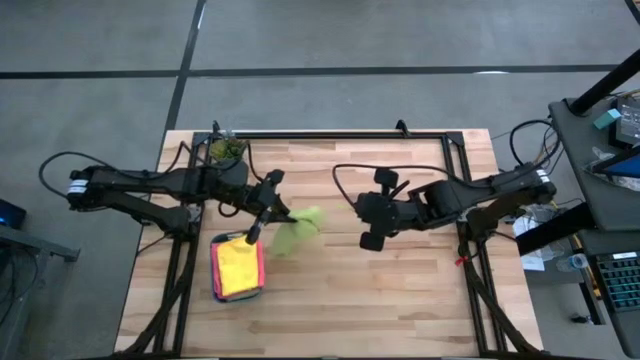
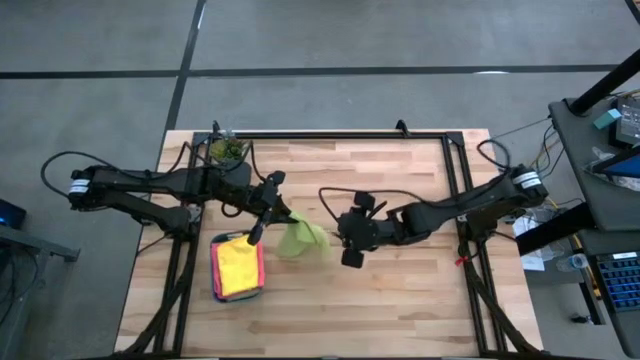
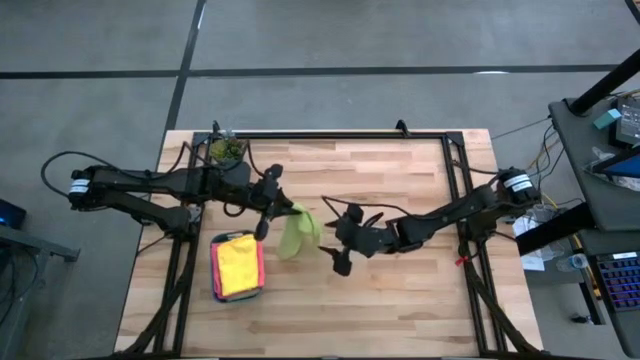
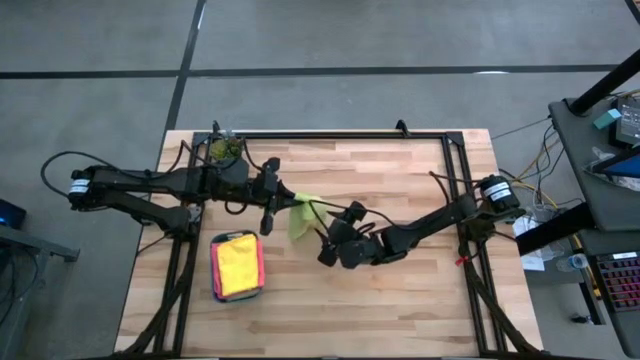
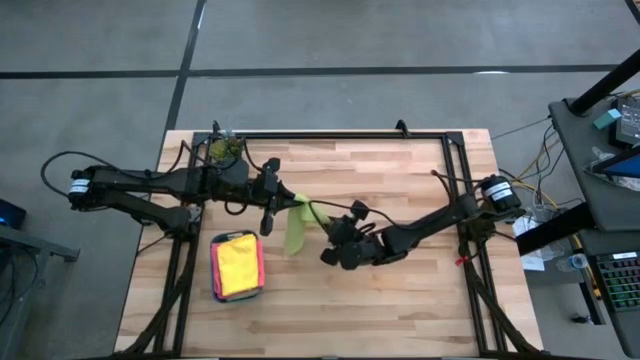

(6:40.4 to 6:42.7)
Task: Fold microfiber towels
Fold the green microfiber cloth

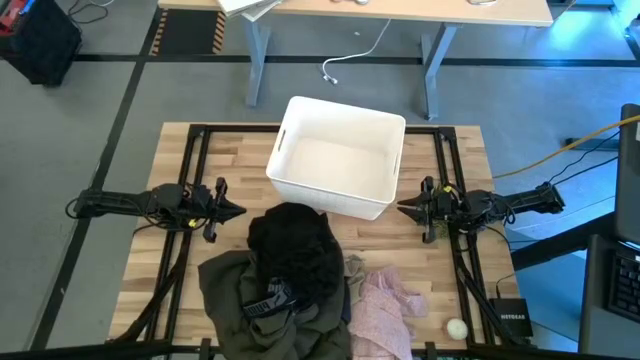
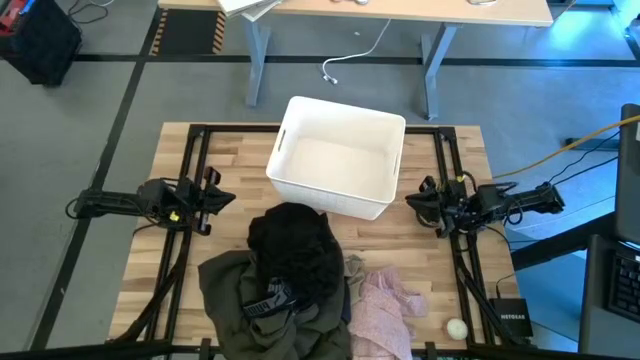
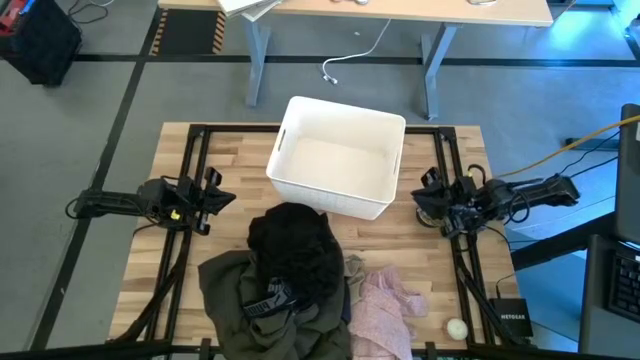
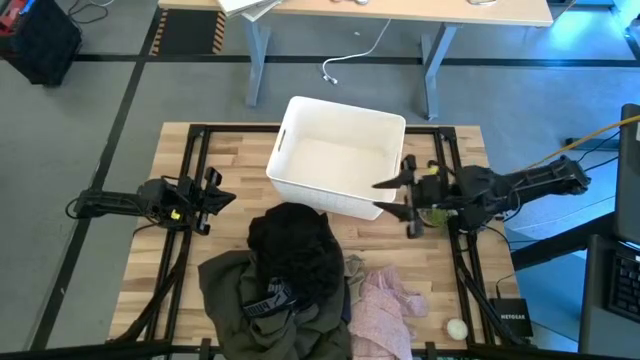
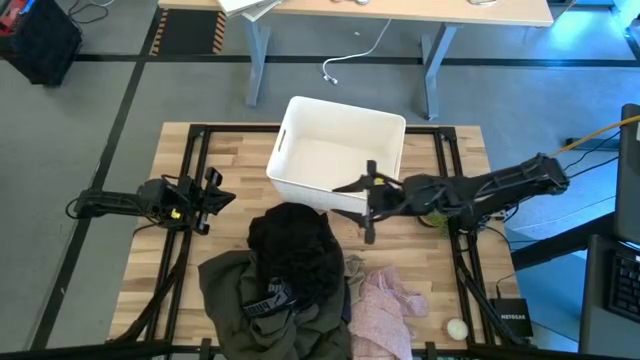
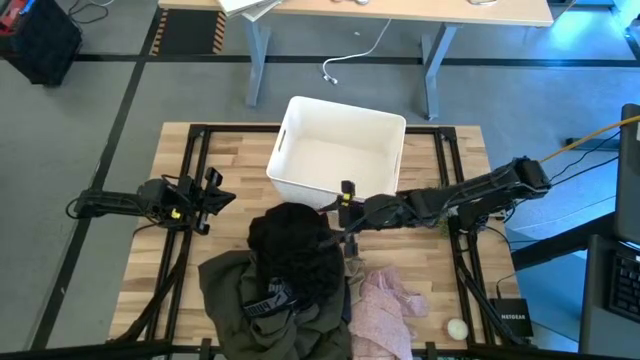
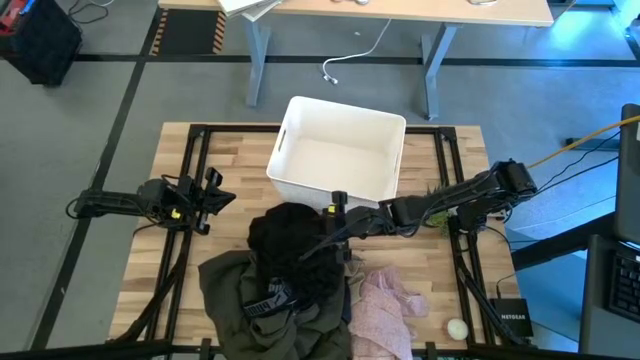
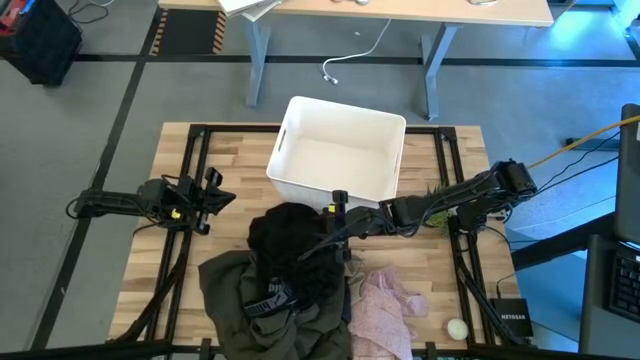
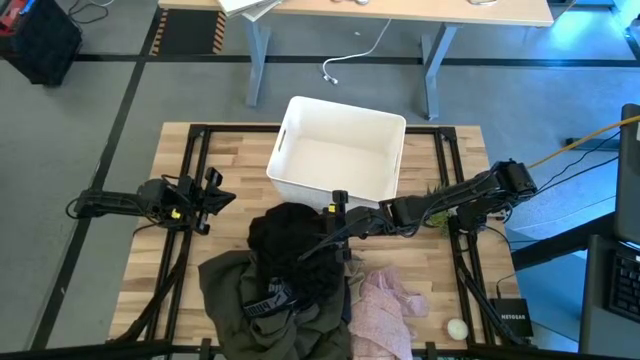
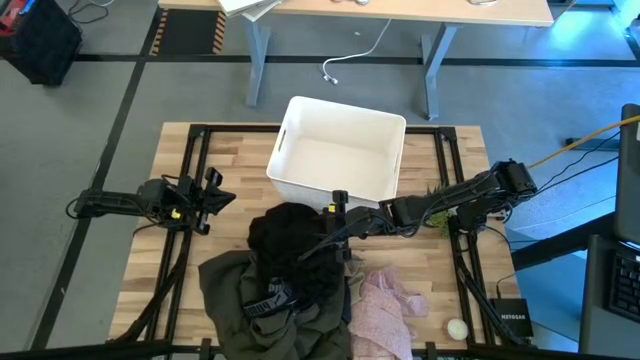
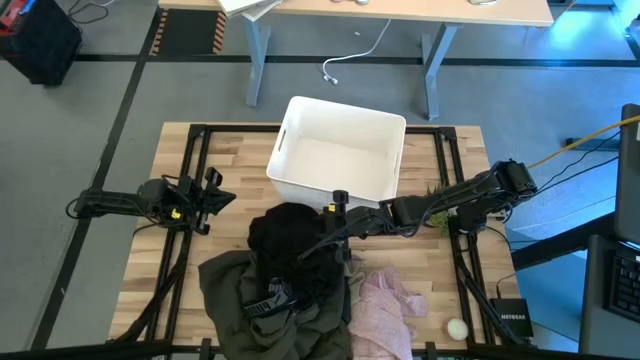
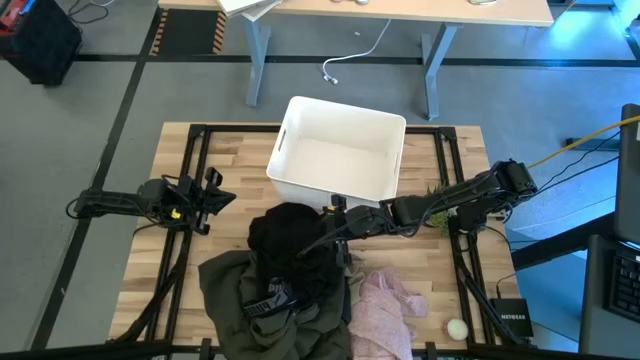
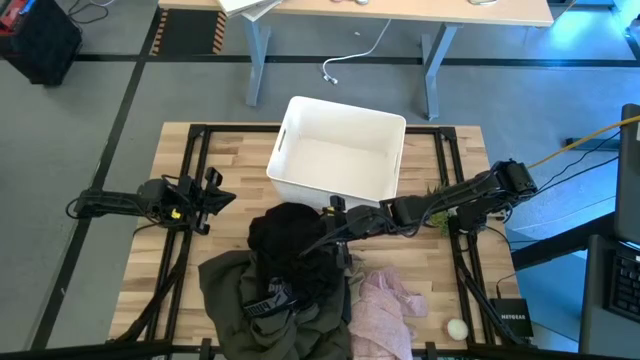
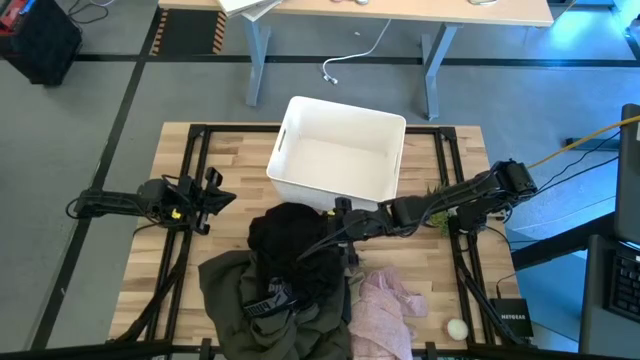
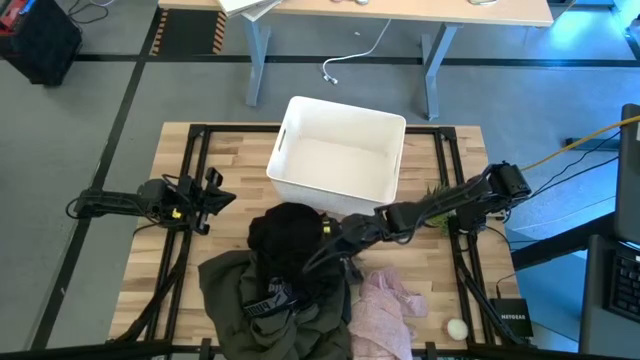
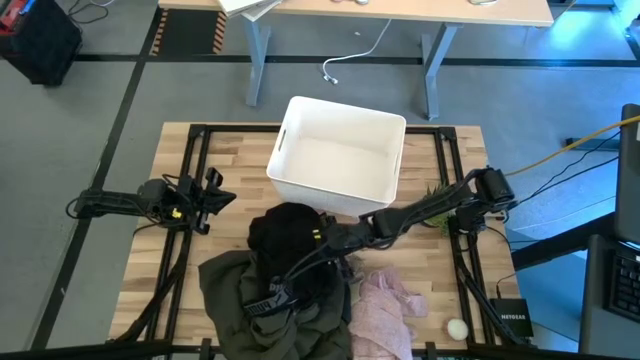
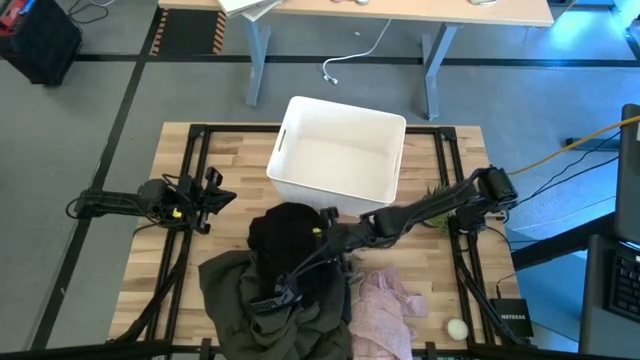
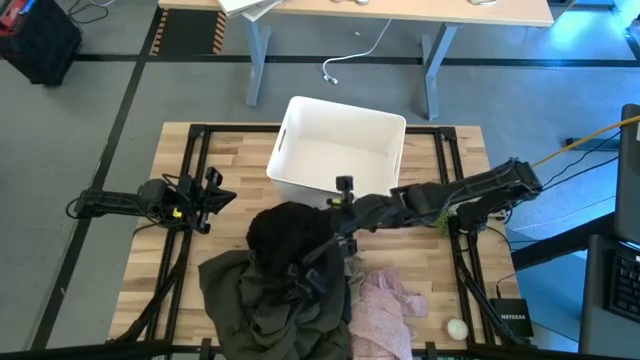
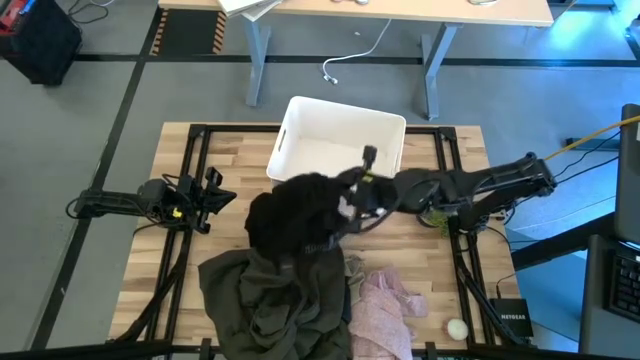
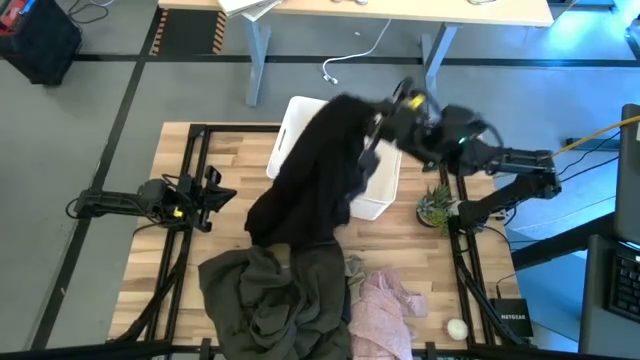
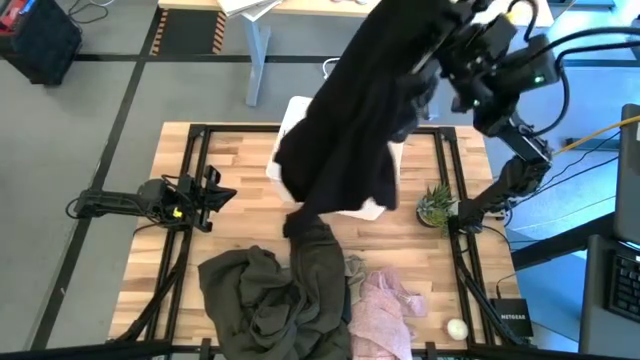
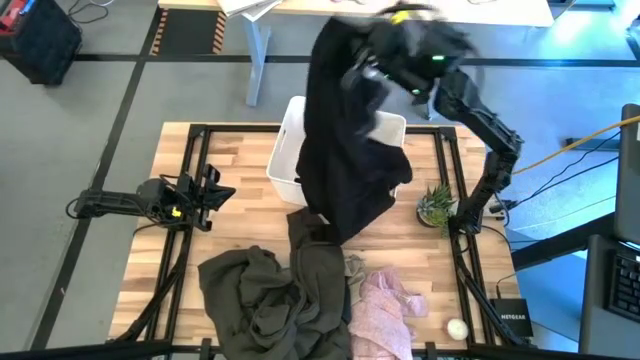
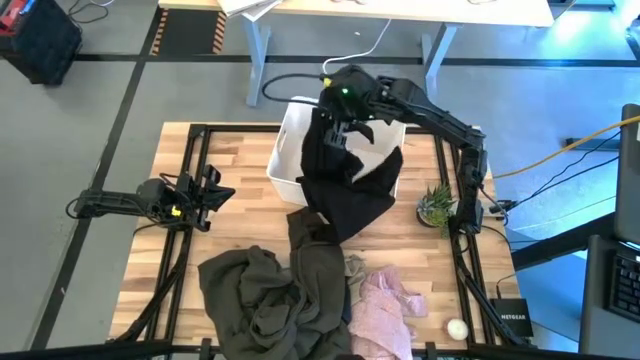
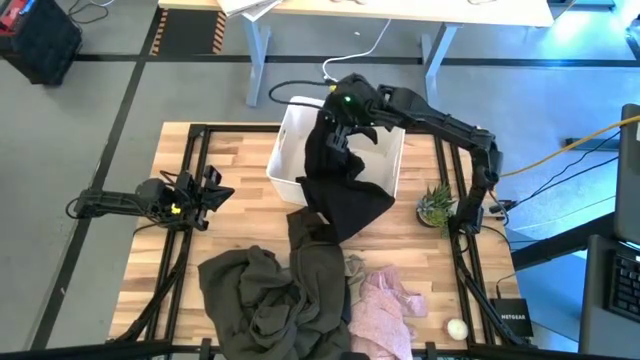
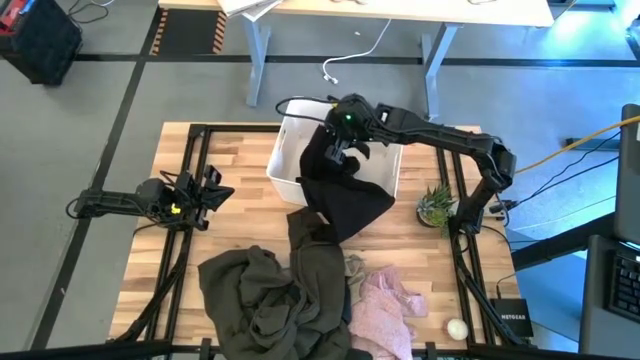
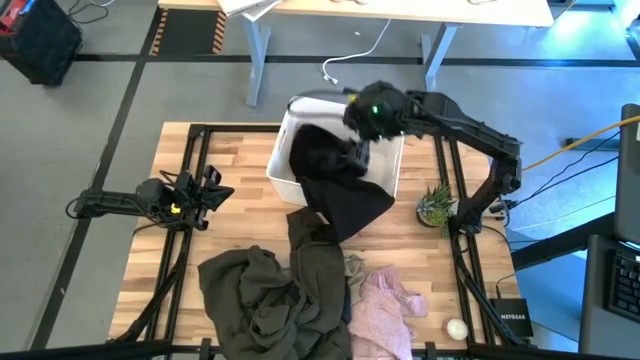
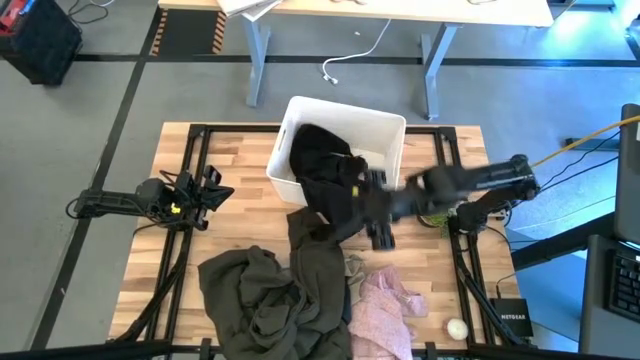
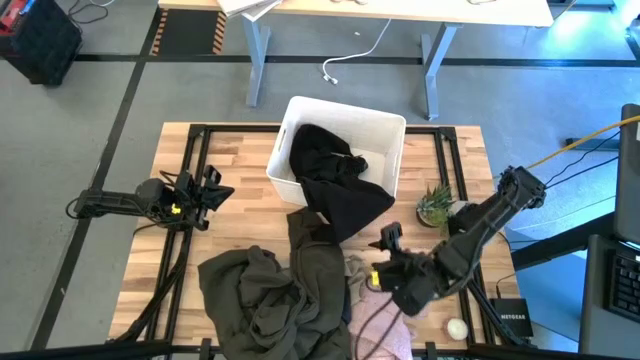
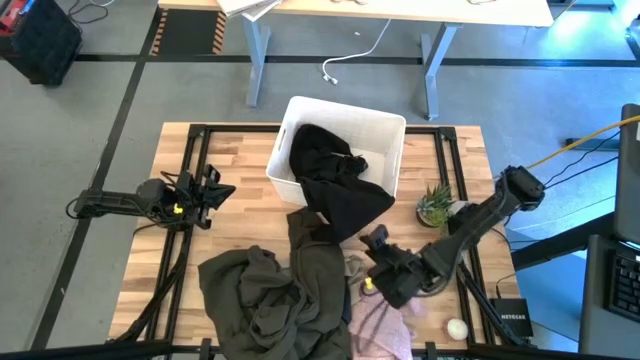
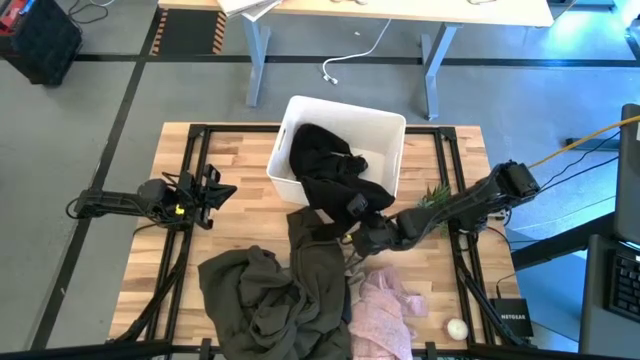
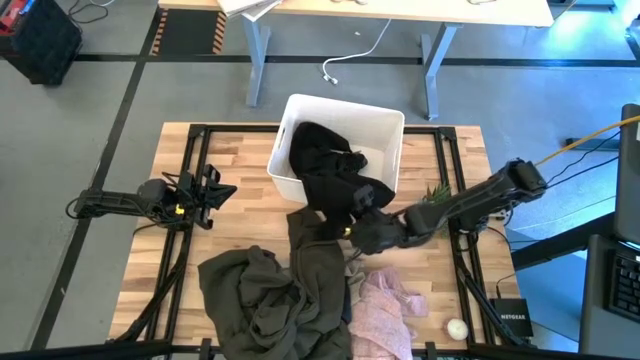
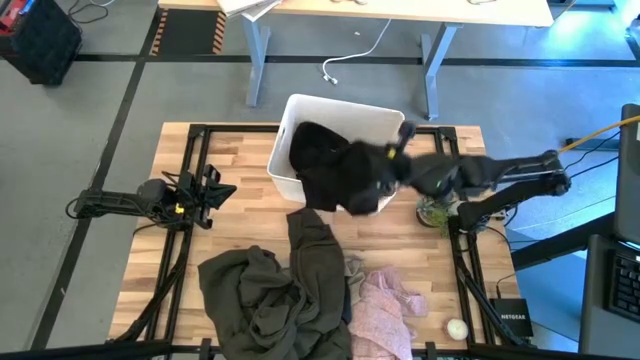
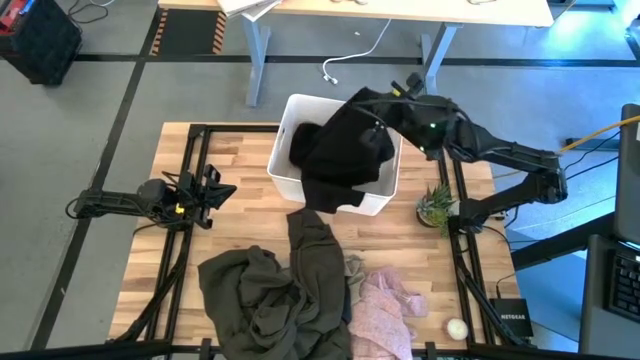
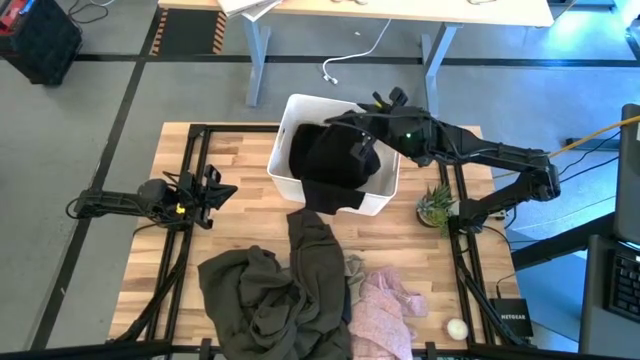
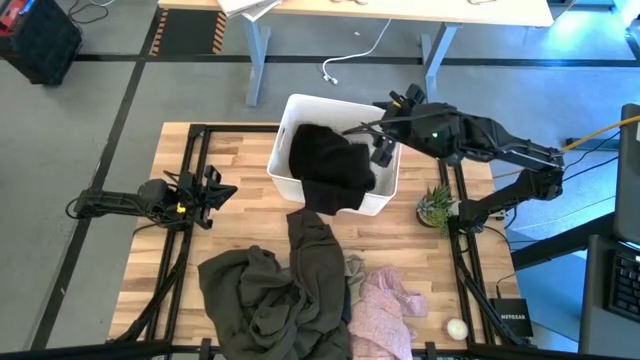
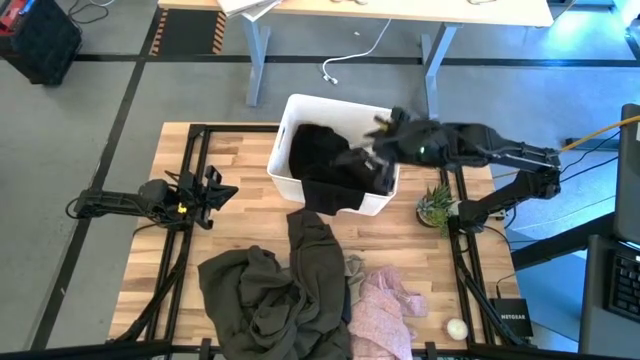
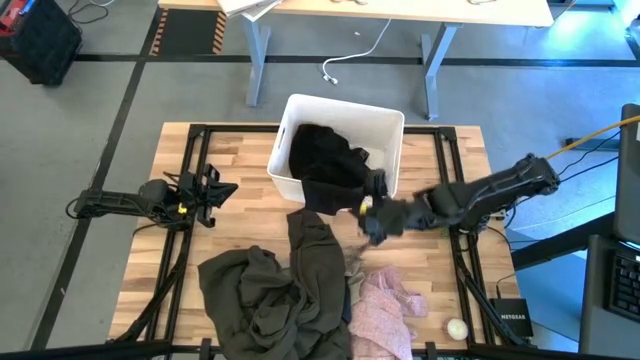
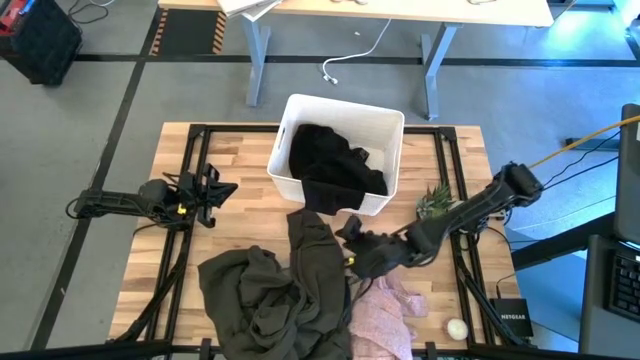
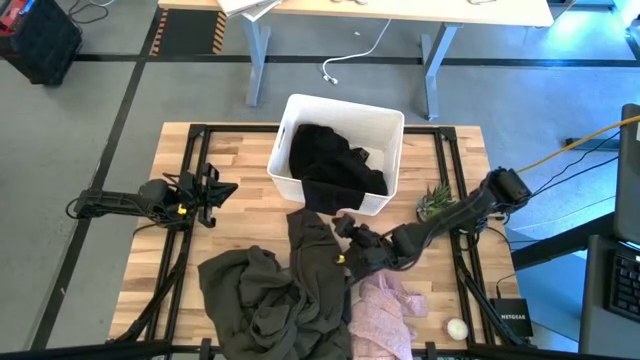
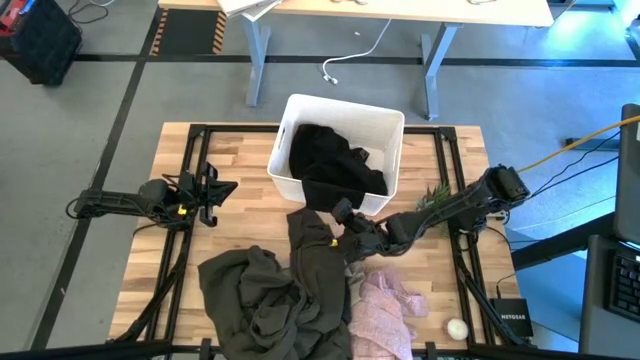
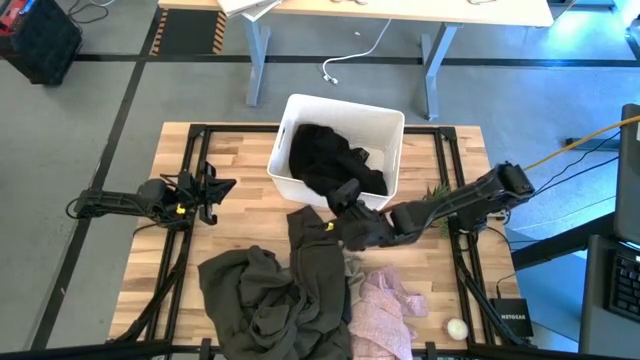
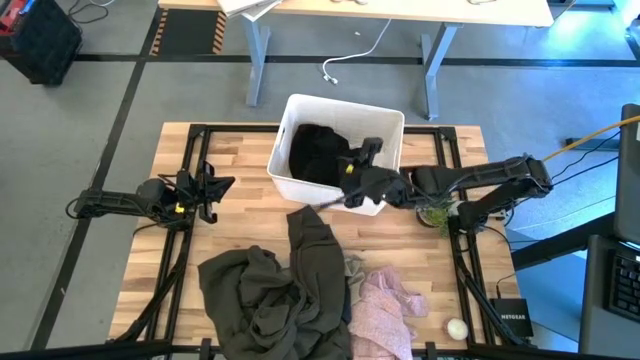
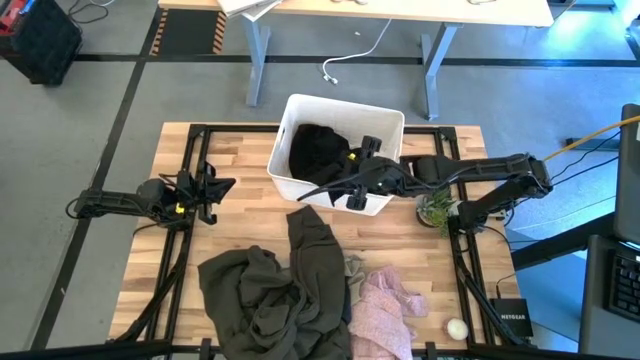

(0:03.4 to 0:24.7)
Task: Sort clothes
Put the black pants into the white bin
